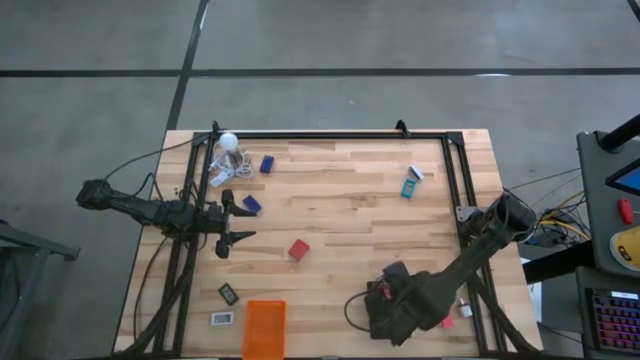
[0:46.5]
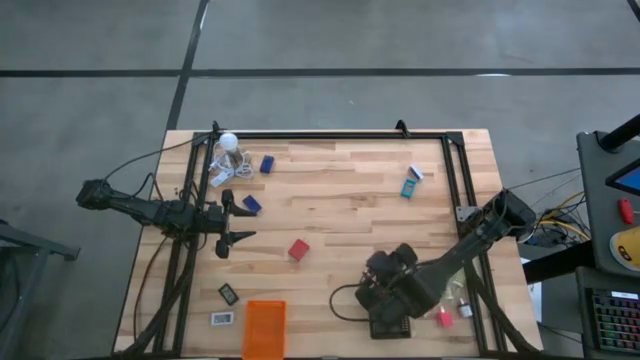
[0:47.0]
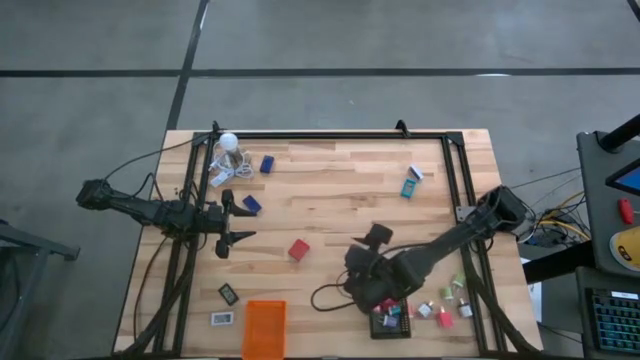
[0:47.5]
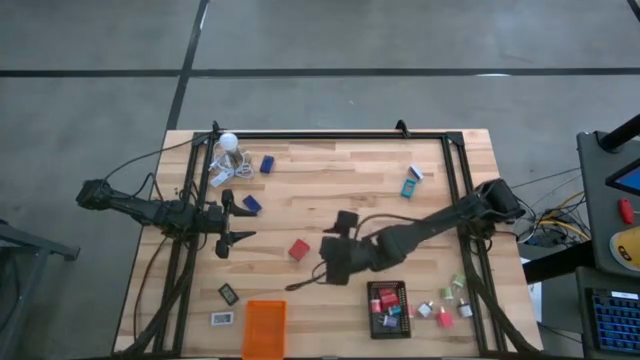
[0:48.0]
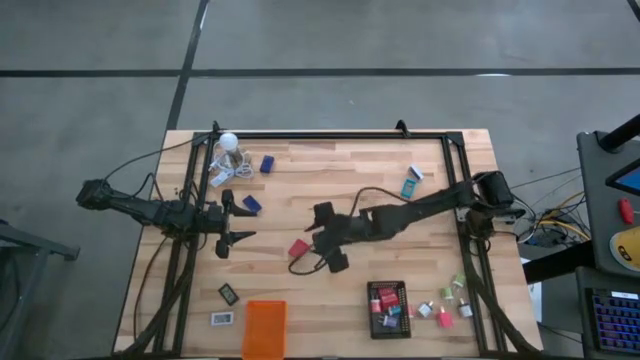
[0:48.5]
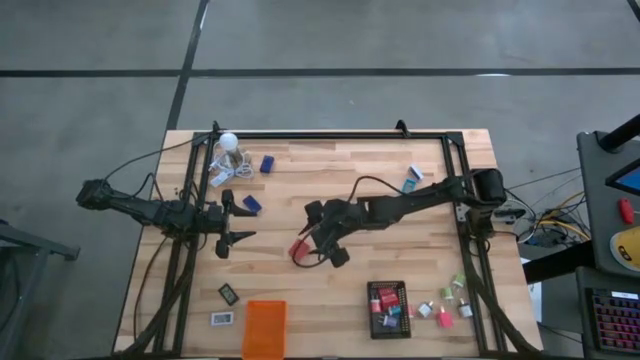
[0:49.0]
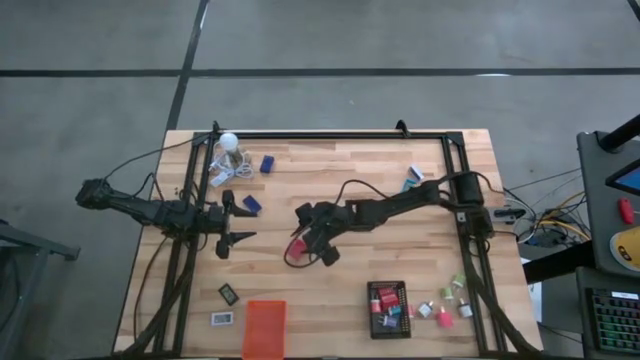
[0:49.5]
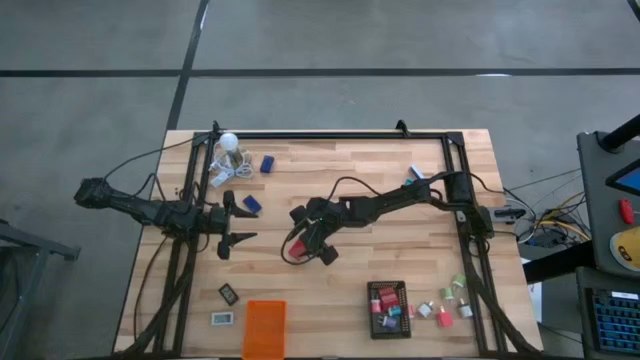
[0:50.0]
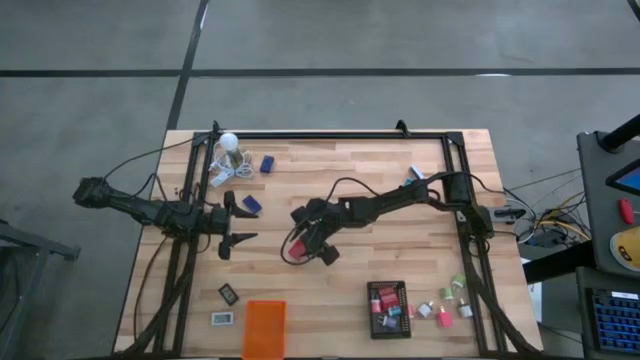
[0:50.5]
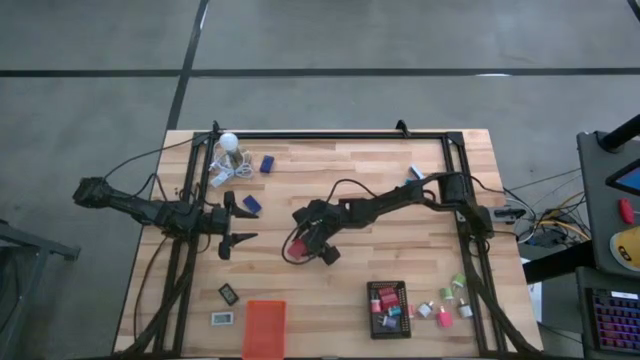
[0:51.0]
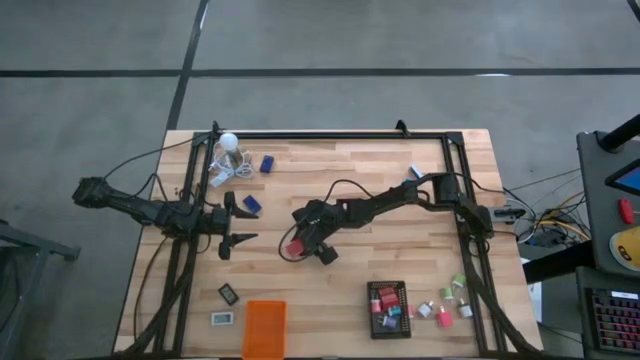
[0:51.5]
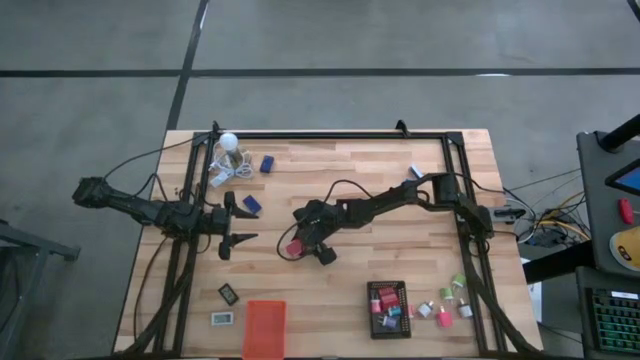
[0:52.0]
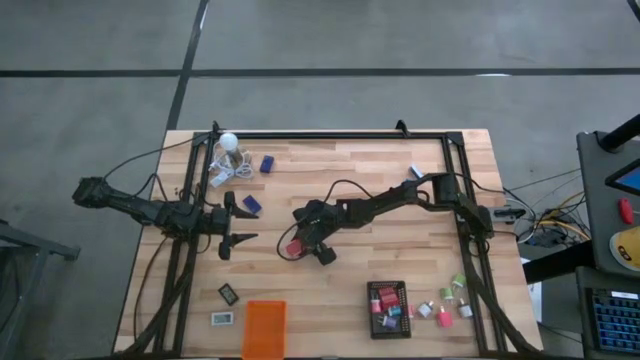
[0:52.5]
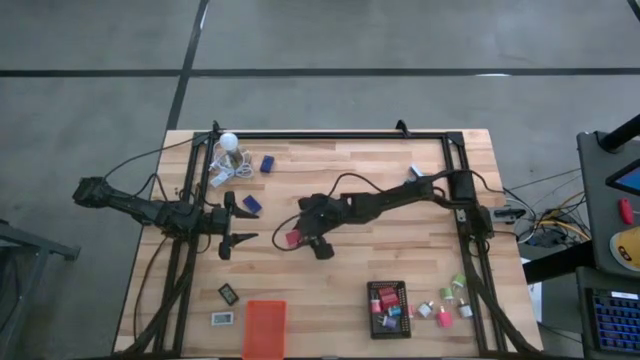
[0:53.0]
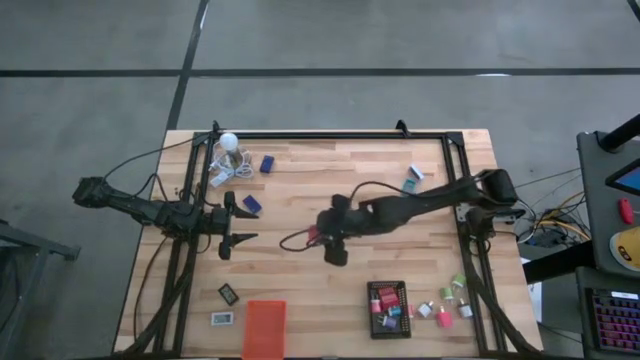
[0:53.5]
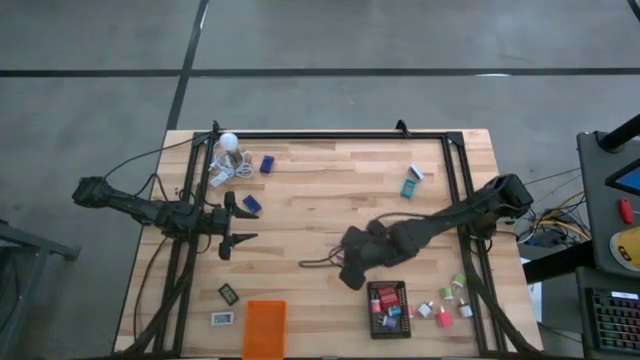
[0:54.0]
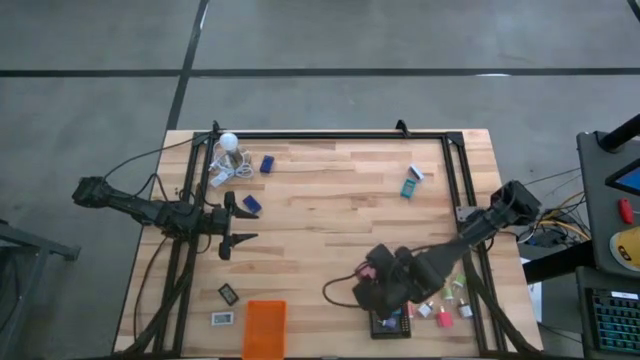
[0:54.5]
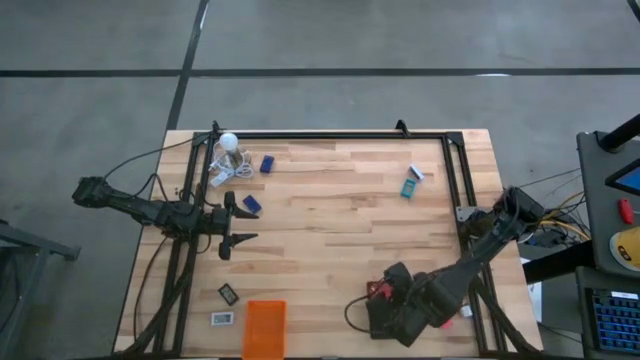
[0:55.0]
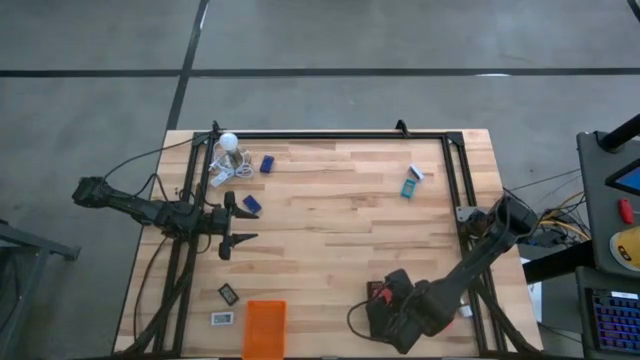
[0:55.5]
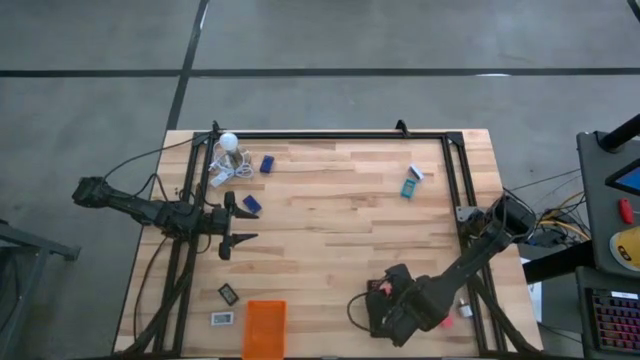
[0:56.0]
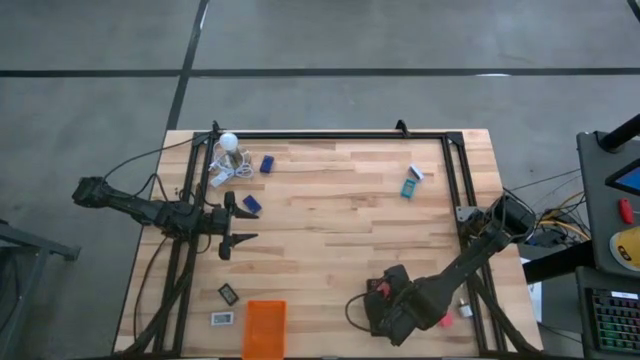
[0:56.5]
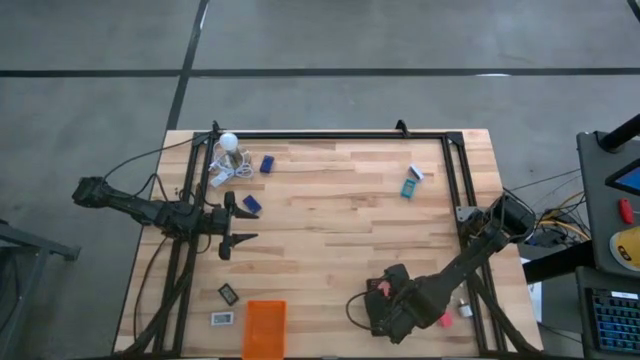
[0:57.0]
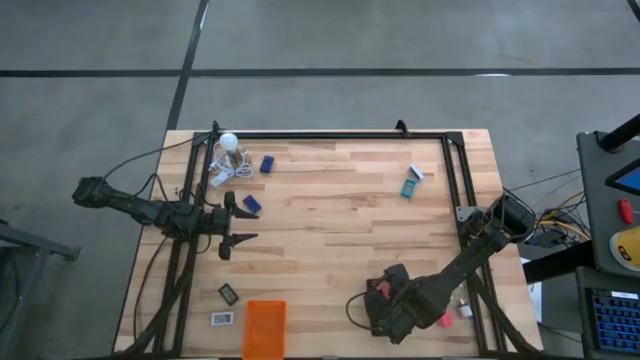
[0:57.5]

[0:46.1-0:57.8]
Task: Pick & Place Office items
Put the red charger adapter into the black bin

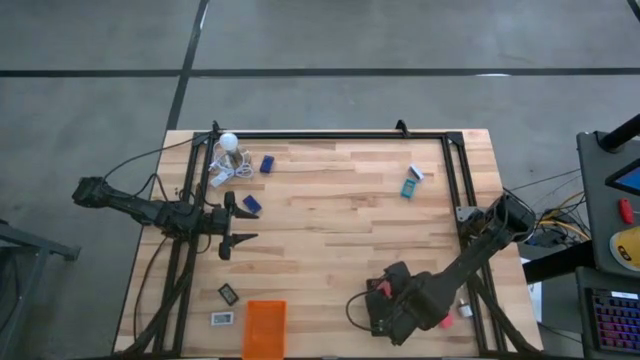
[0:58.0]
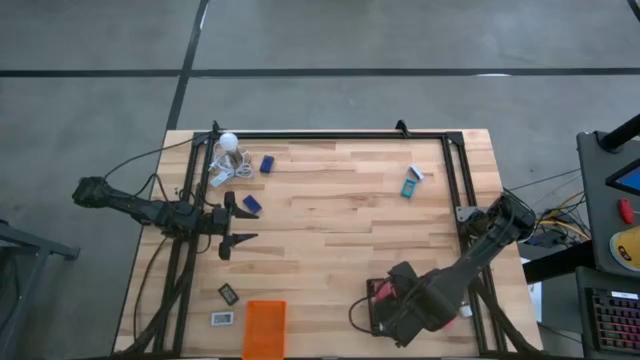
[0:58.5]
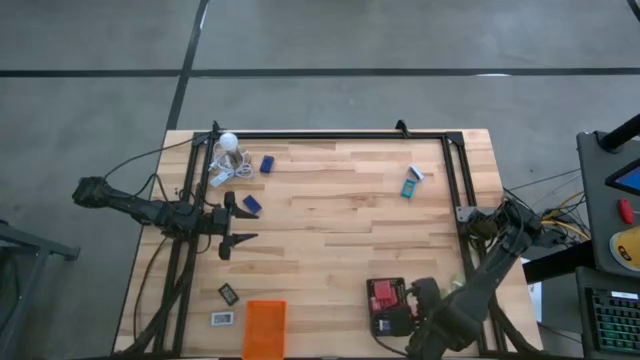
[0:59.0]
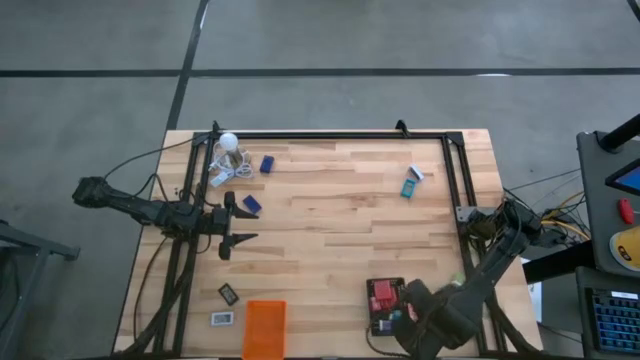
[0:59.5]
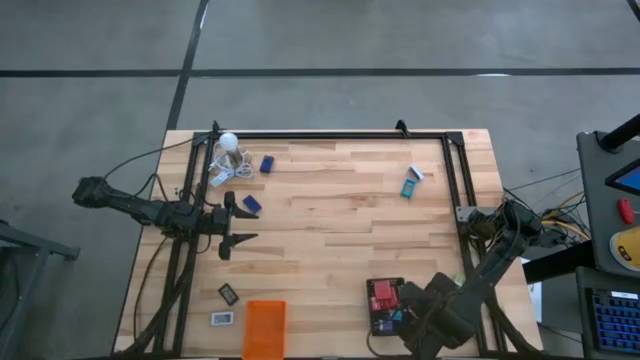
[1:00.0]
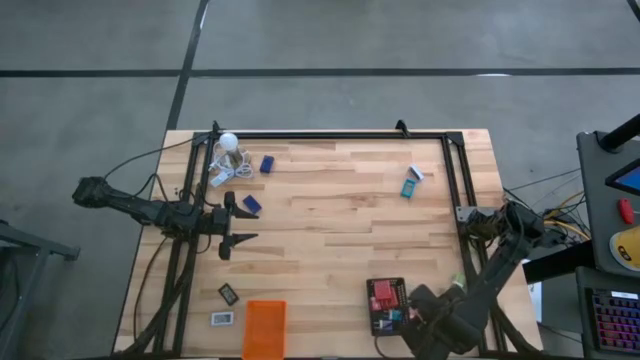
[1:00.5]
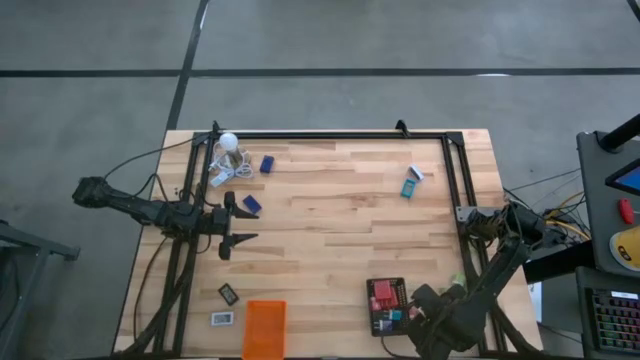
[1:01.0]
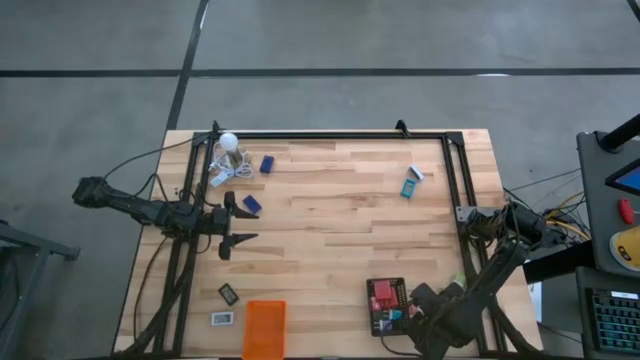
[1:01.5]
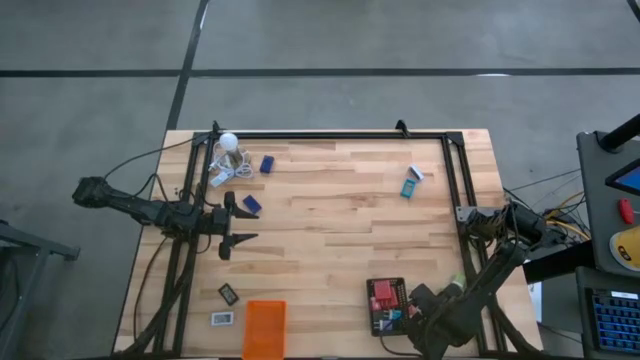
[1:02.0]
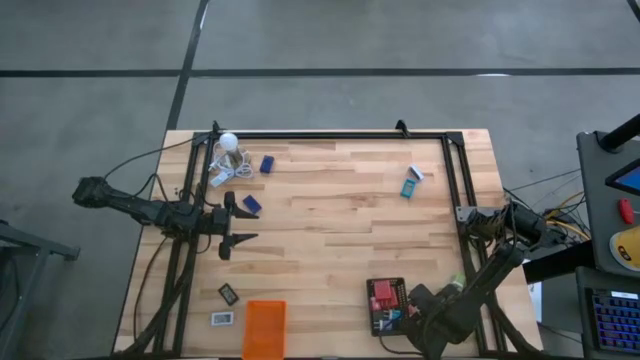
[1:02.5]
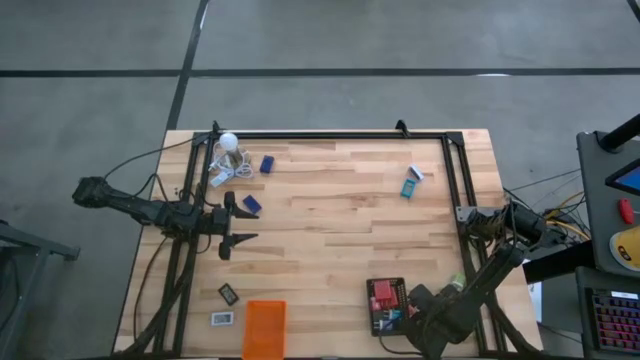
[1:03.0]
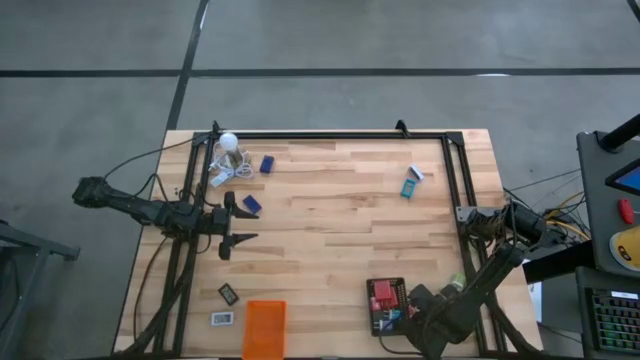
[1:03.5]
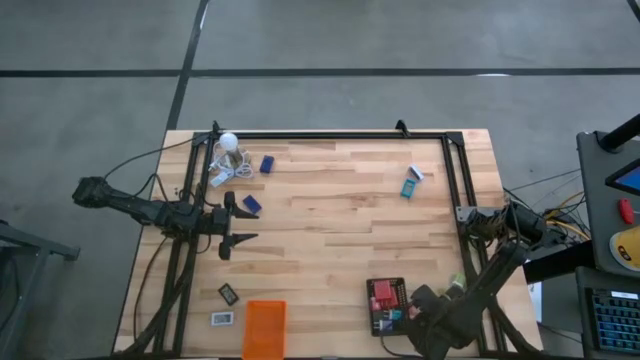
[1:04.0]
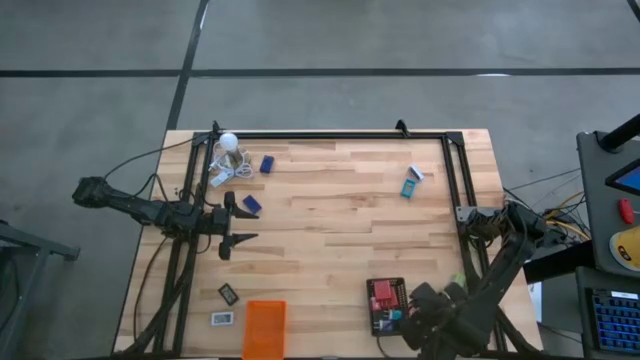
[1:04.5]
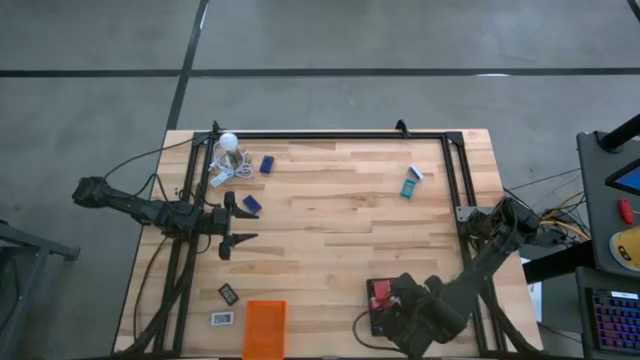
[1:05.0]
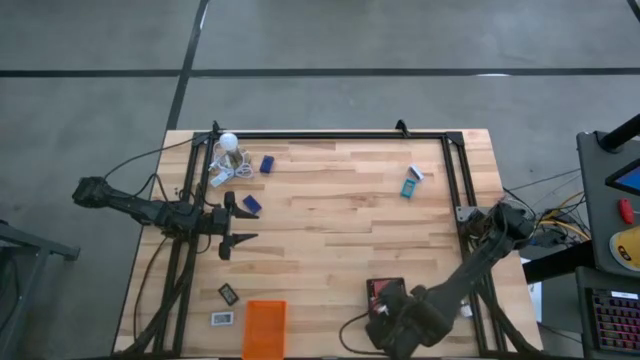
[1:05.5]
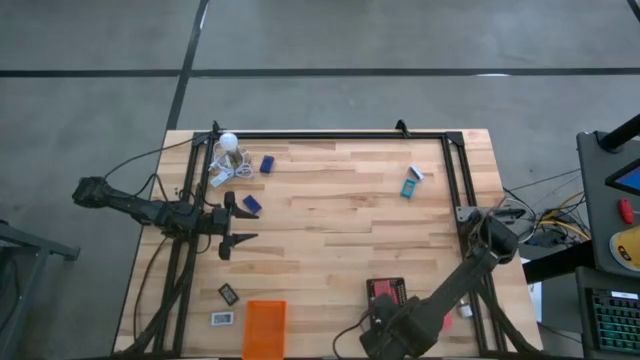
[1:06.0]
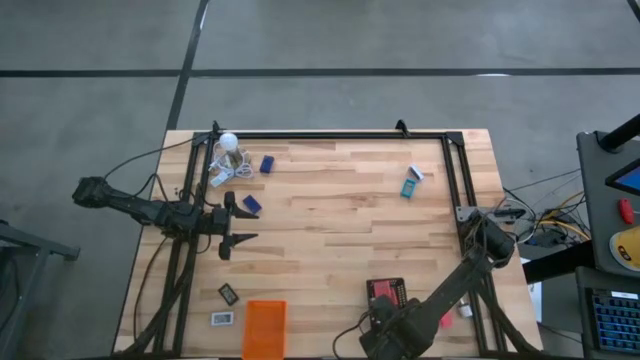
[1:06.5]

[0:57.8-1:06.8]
Put the left white charger adapter into the black bin
